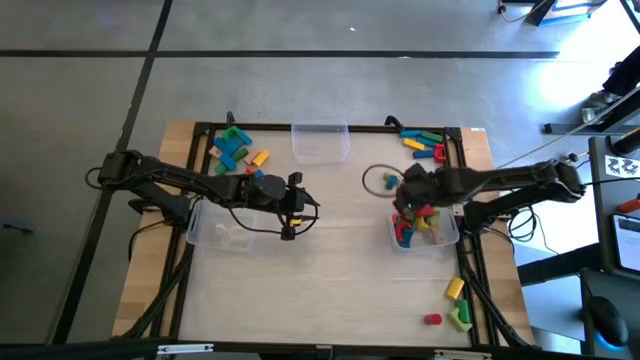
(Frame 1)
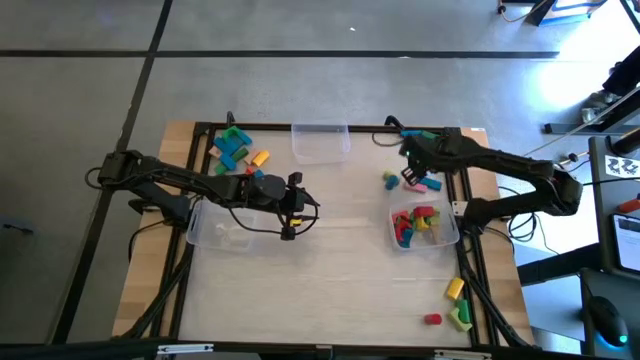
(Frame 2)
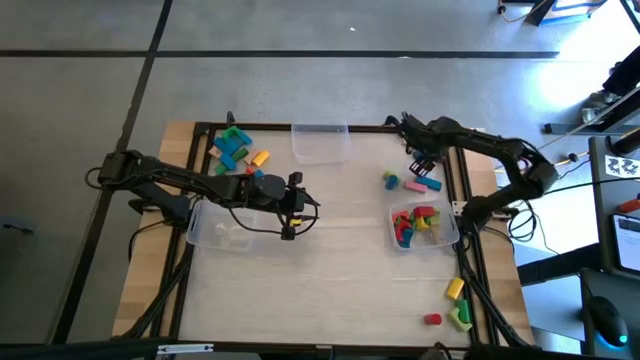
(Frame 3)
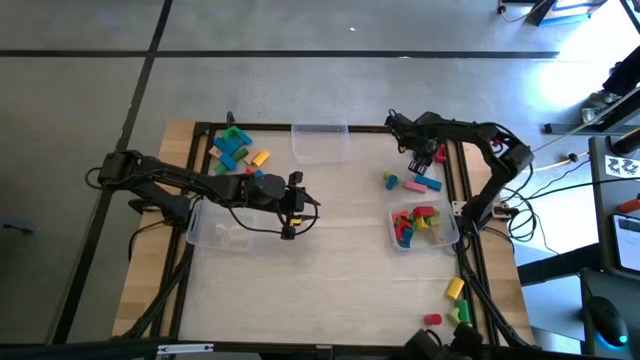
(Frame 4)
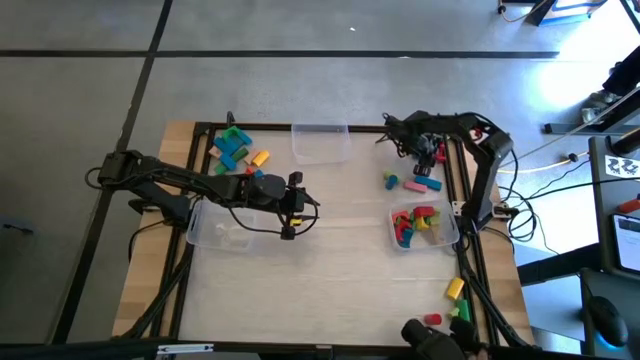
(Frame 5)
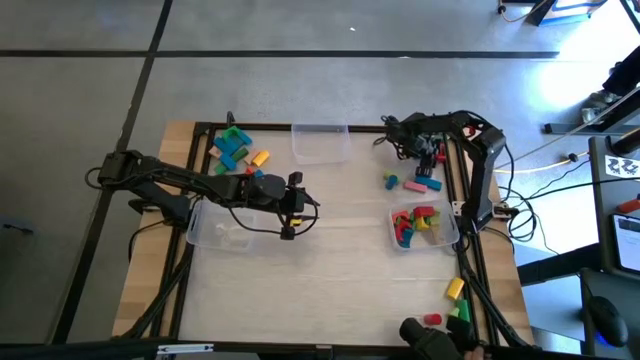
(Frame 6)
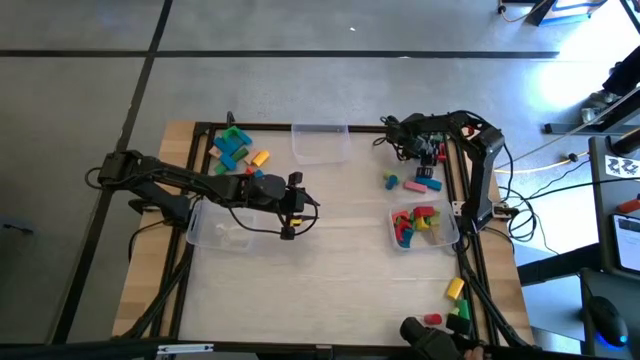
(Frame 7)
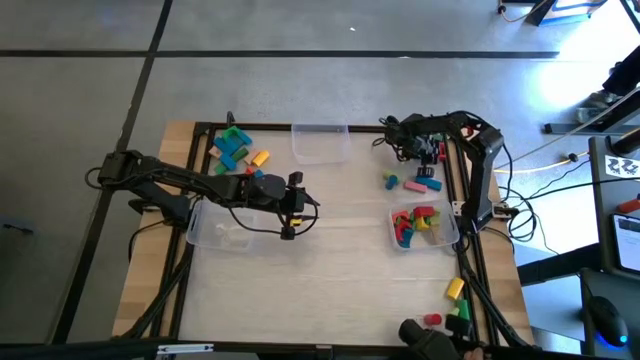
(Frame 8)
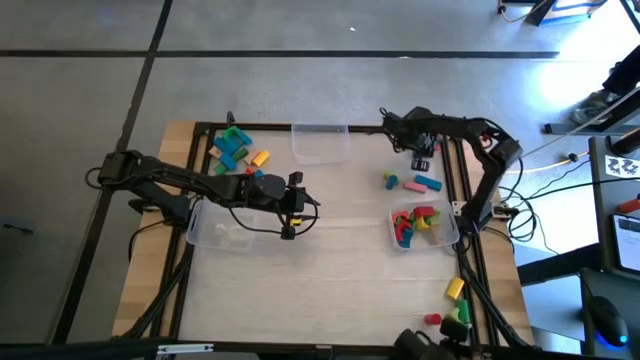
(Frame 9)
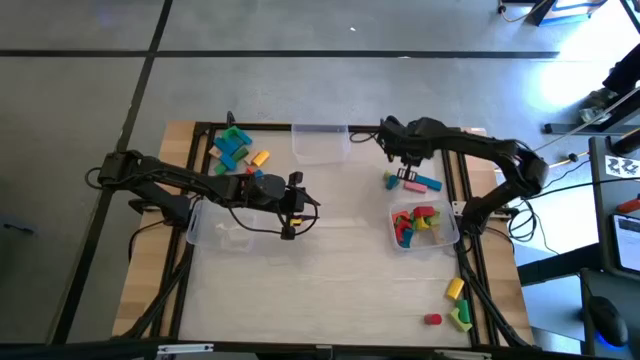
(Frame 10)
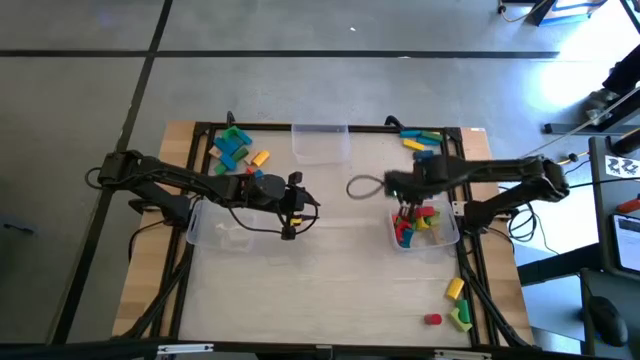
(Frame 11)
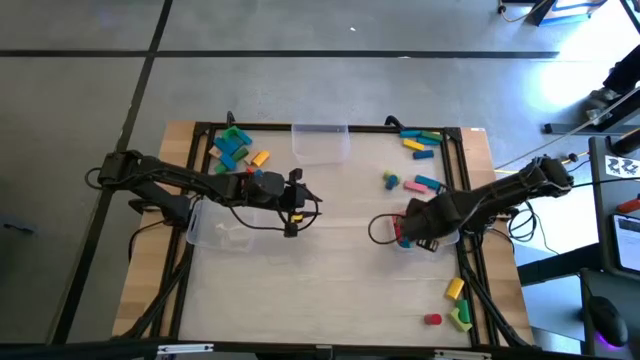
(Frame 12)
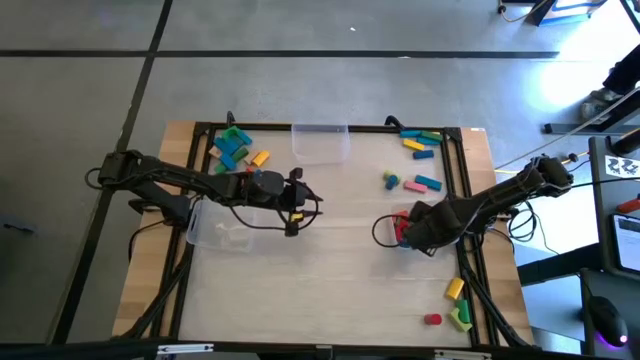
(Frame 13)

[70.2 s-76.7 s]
Task: Sort blocks by size
Put the red arch block into the bottom right transparent bin

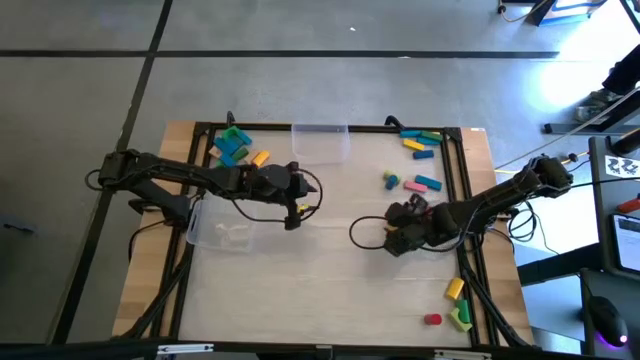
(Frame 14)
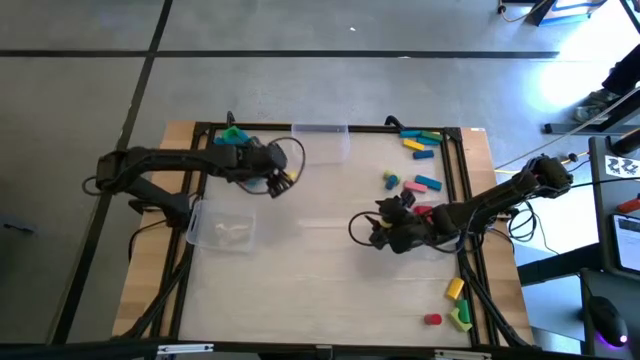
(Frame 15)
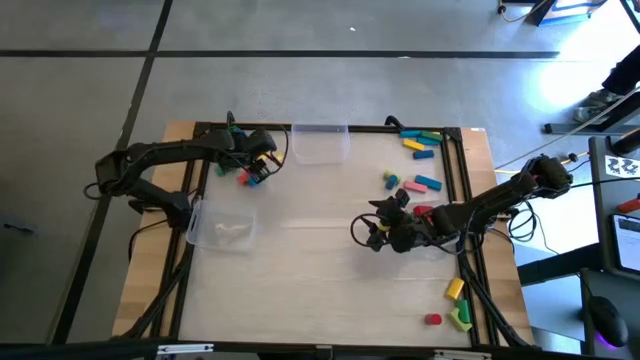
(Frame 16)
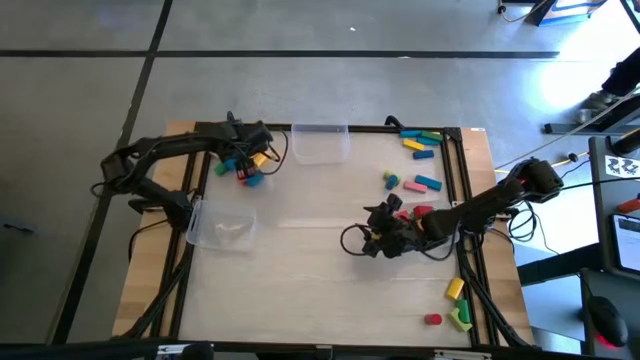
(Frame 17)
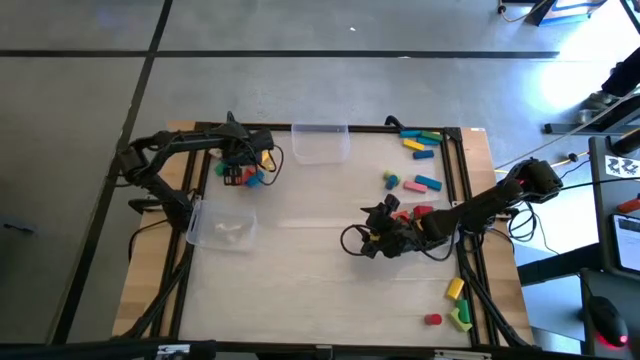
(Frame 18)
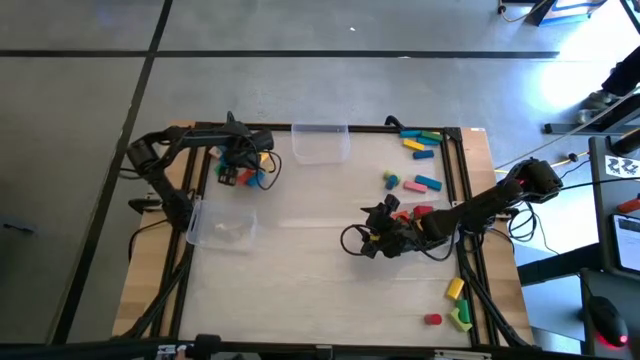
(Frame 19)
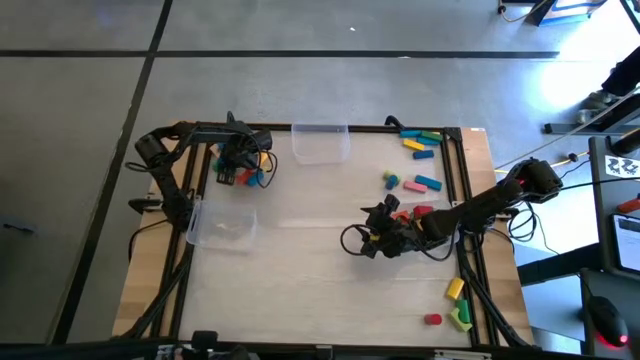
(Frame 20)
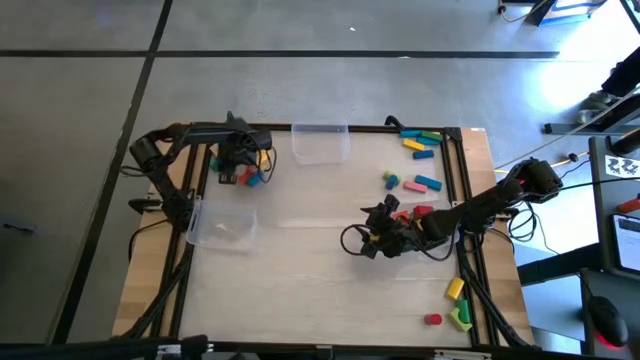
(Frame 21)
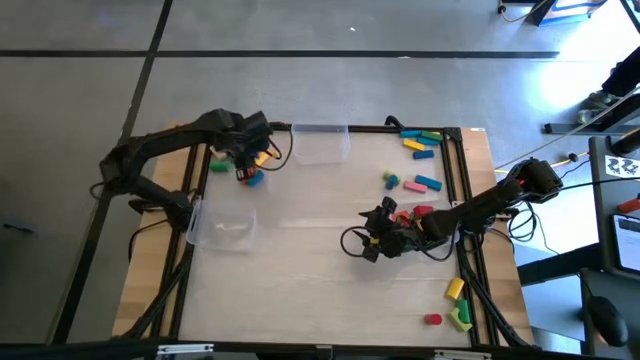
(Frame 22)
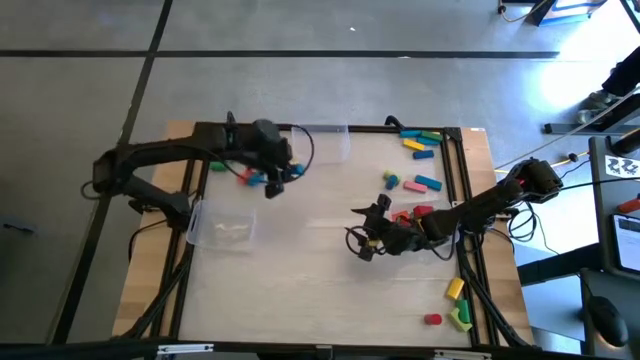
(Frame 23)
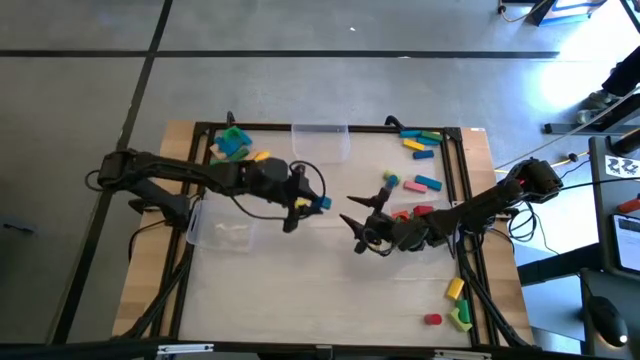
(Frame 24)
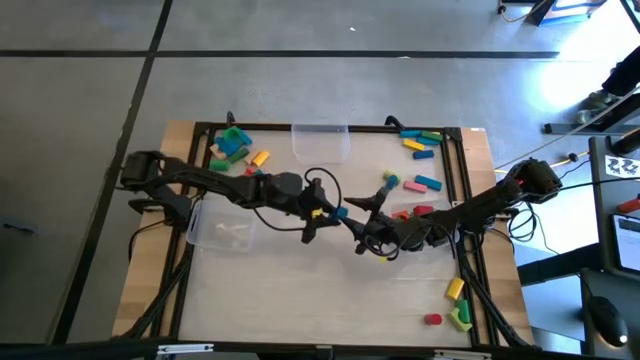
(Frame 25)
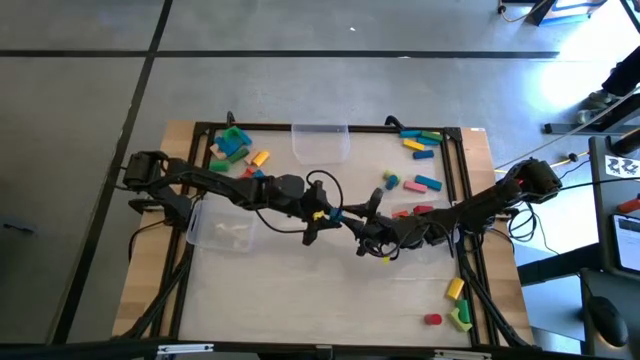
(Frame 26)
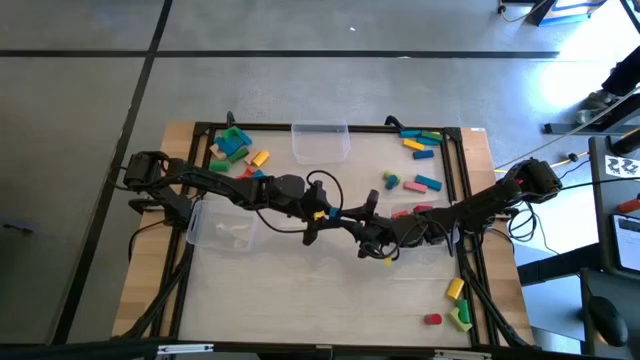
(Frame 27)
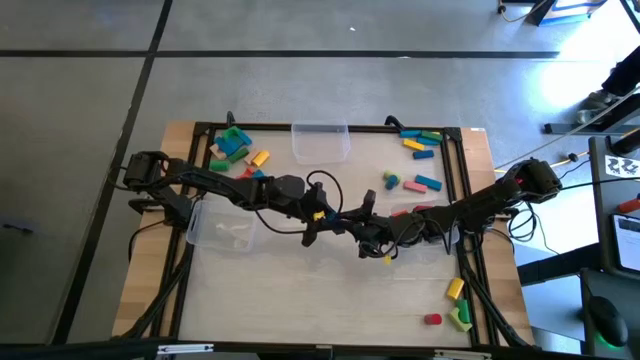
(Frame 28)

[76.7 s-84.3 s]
Put the blue arch block into the bottom right transparent bin

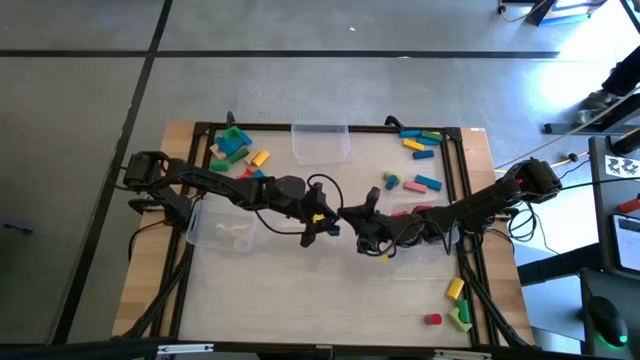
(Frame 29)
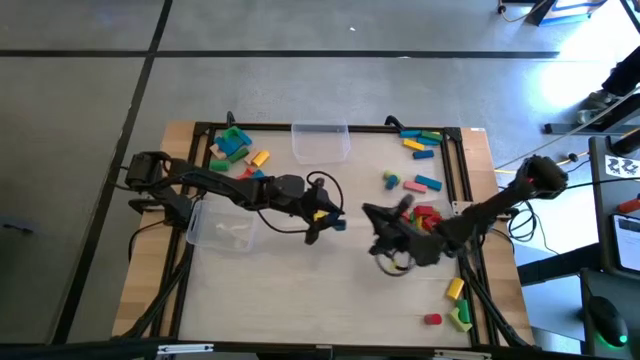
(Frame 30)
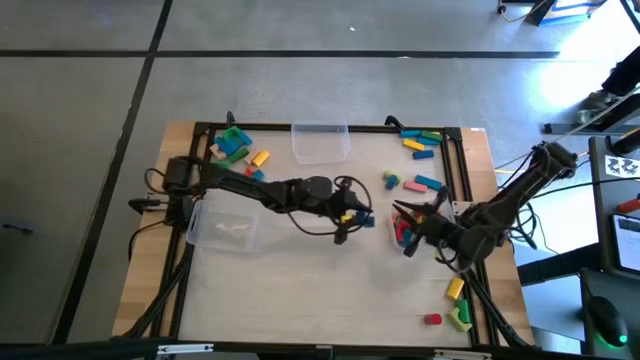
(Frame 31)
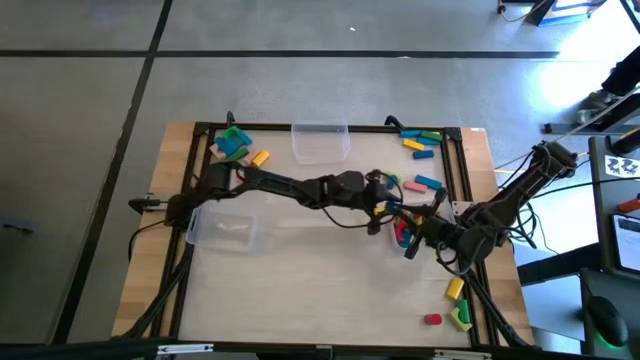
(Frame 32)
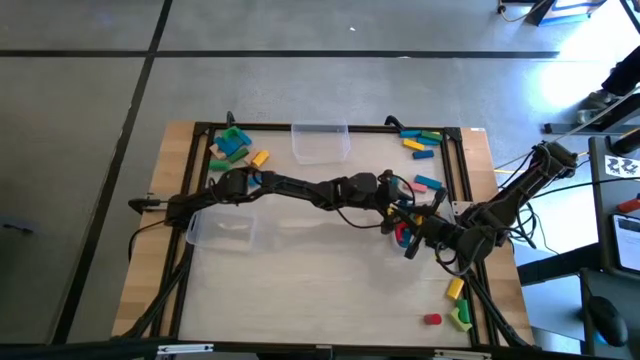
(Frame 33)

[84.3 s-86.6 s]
Put the blue arch block into the bottom right transparent bin

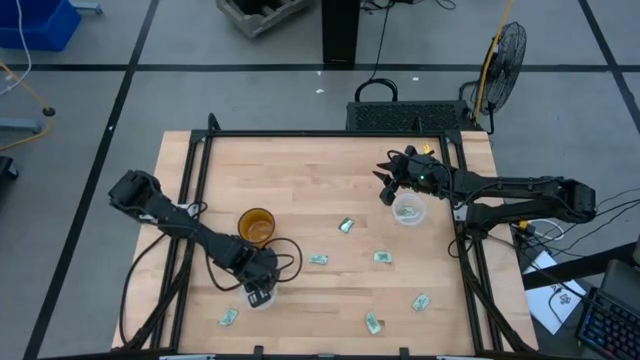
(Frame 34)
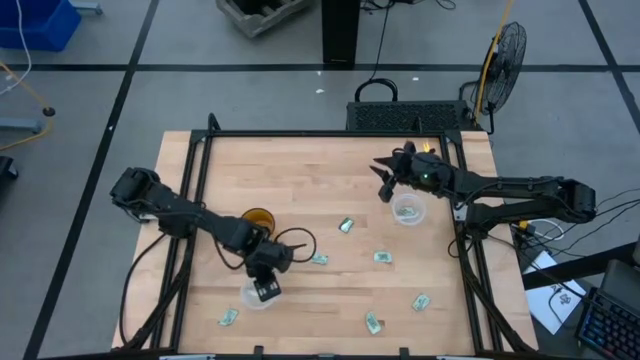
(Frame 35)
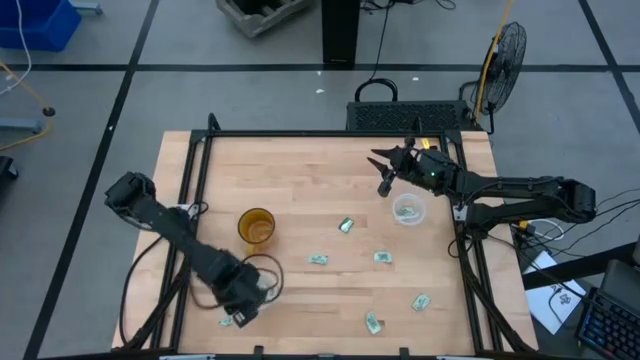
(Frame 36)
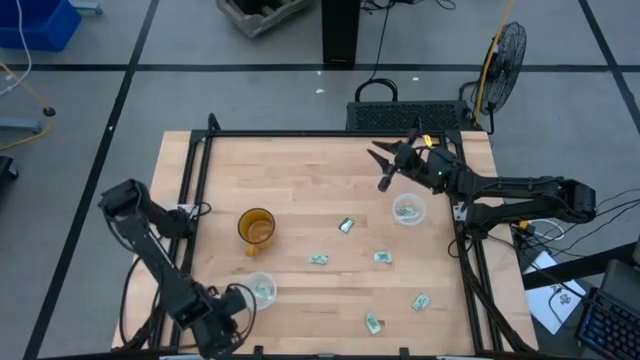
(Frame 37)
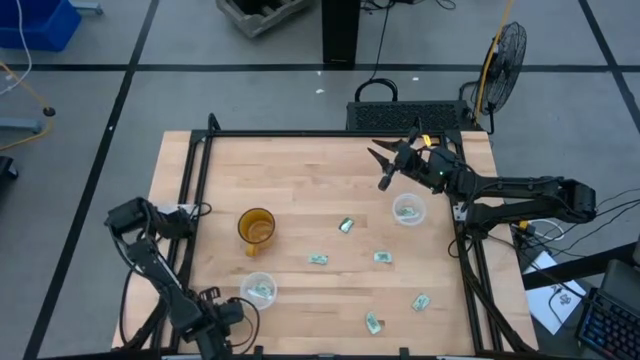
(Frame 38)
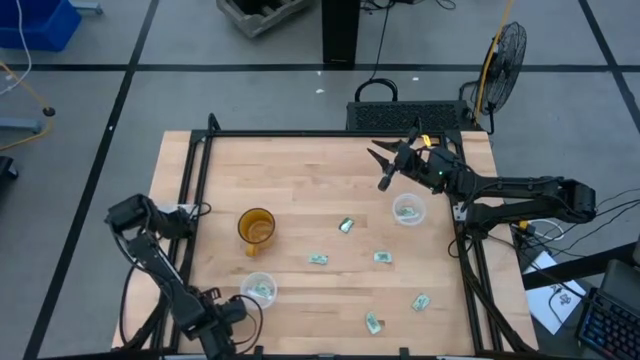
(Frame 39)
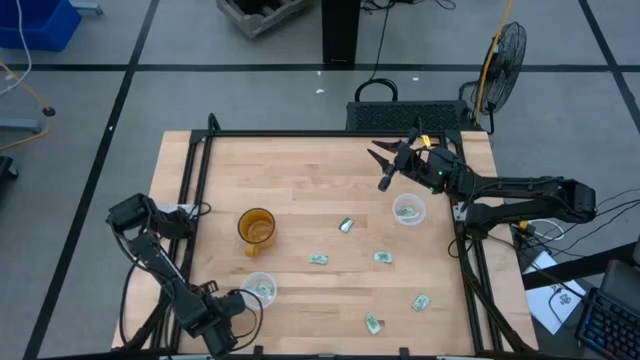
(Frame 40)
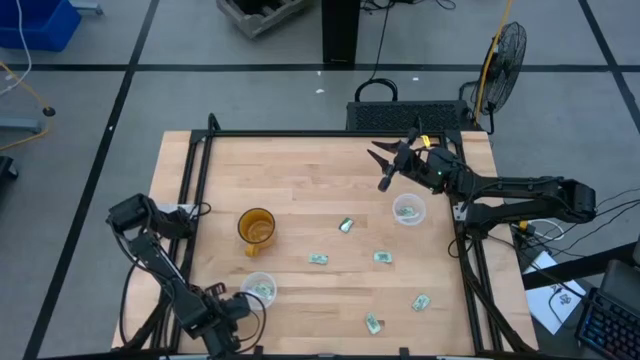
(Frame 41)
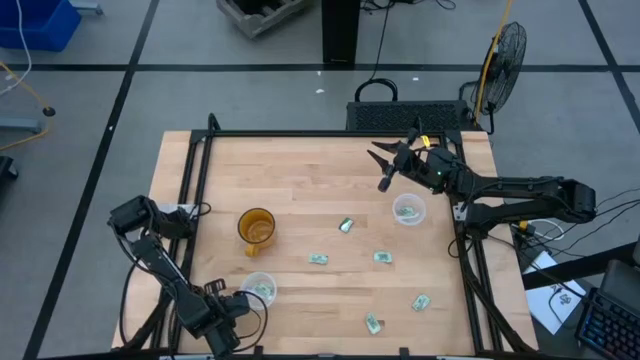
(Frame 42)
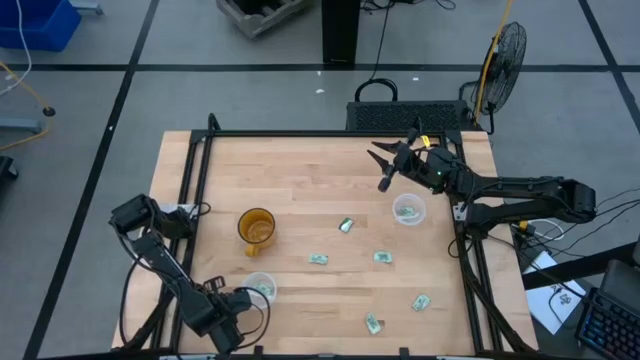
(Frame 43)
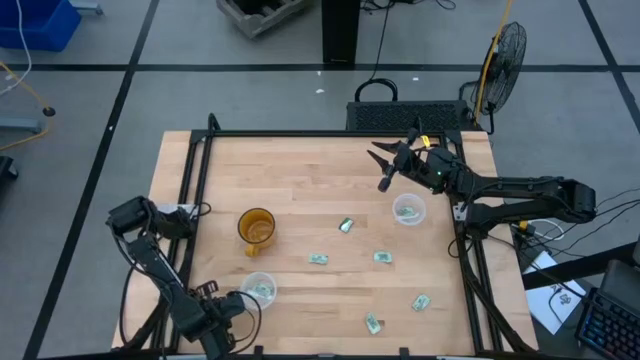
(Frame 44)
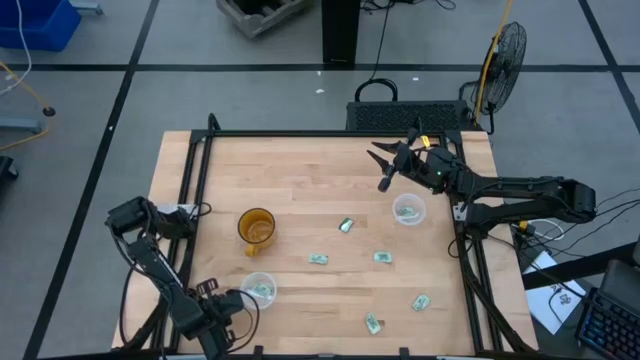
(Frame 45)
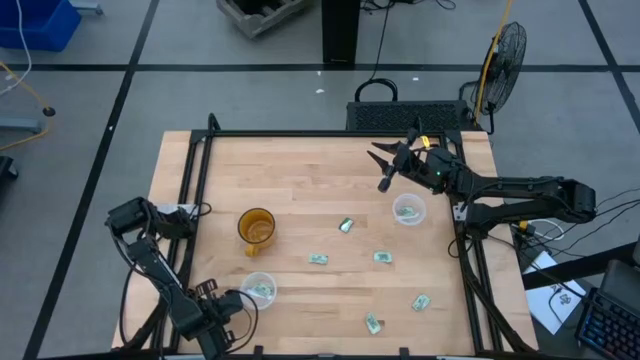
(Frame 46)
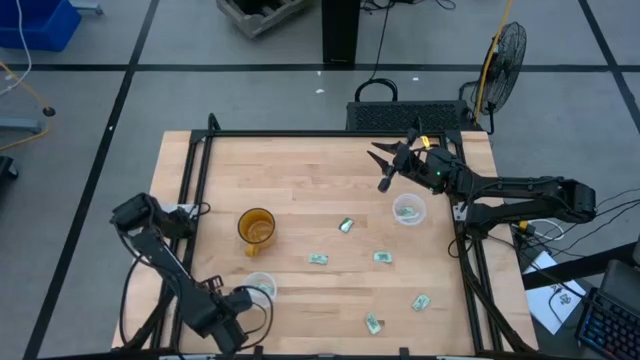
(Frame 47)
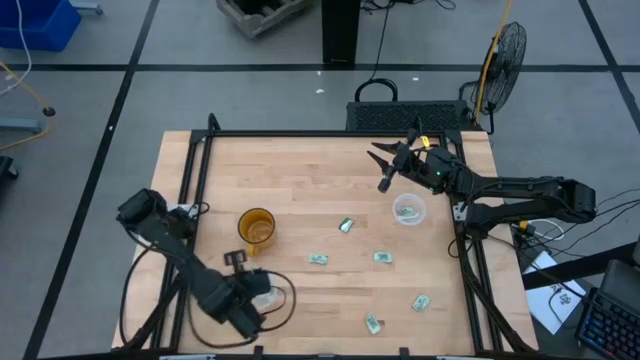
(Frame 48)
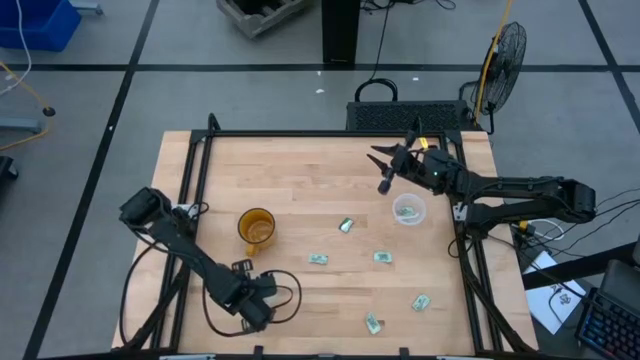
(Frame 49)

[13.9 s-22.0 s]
Task: Pick and place Stevia / Truvia into bins
Put the stevia packet into the bottom transparent container
